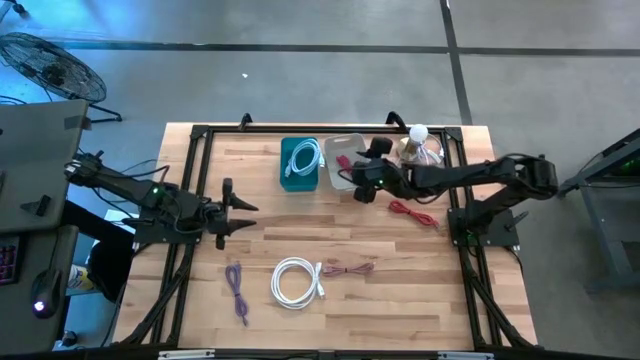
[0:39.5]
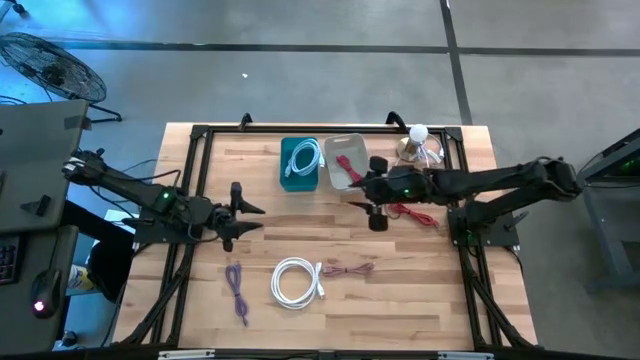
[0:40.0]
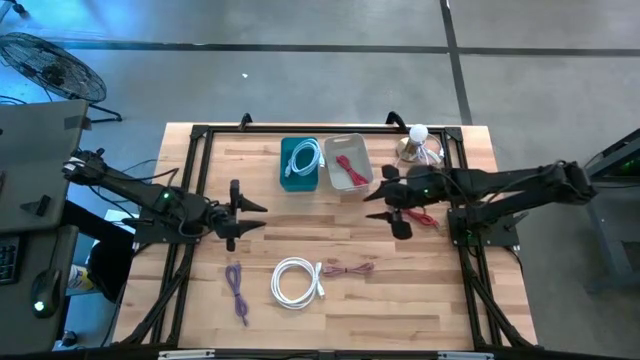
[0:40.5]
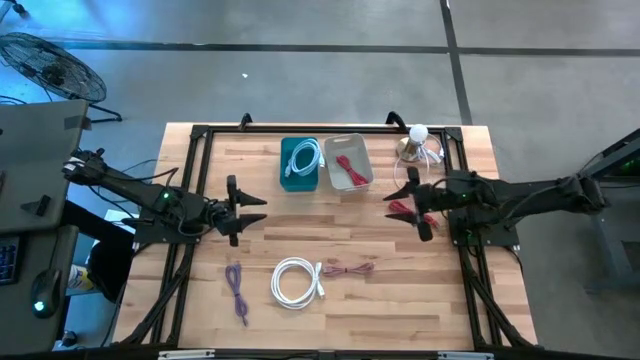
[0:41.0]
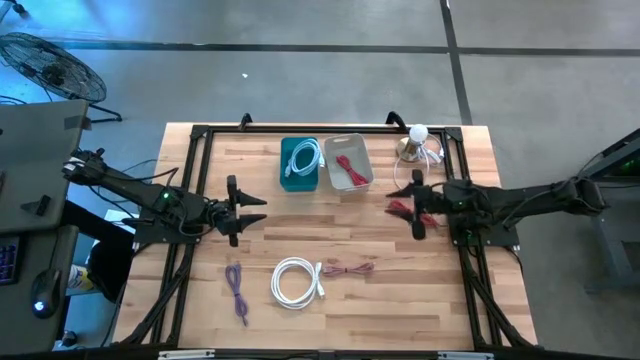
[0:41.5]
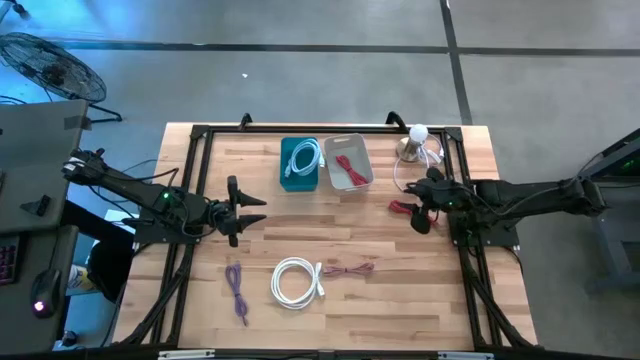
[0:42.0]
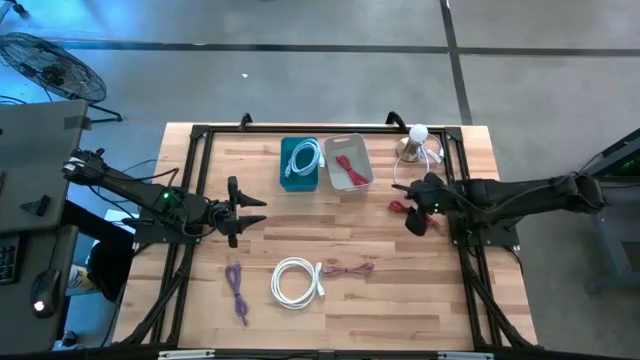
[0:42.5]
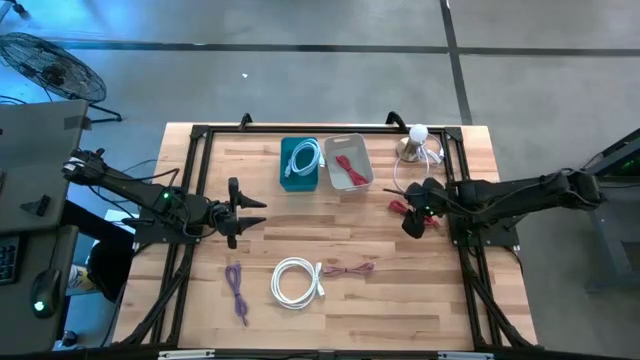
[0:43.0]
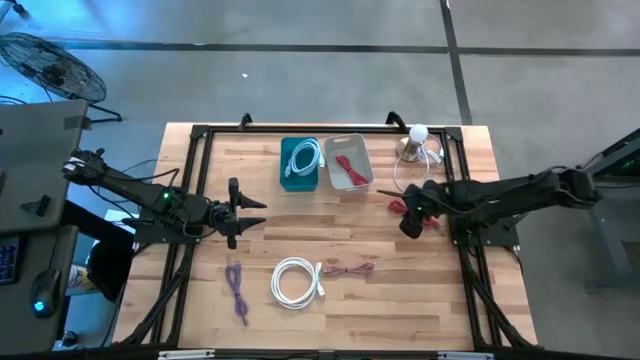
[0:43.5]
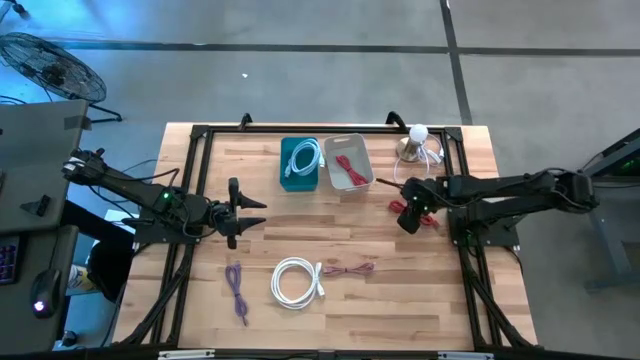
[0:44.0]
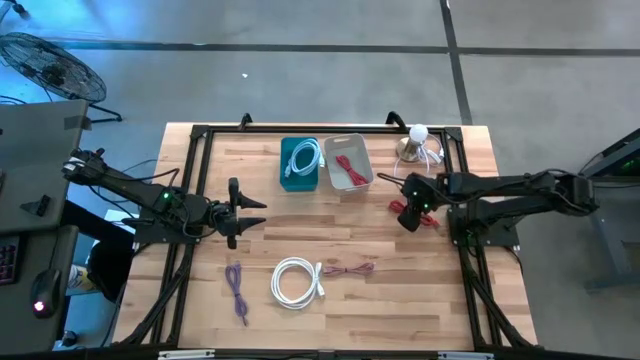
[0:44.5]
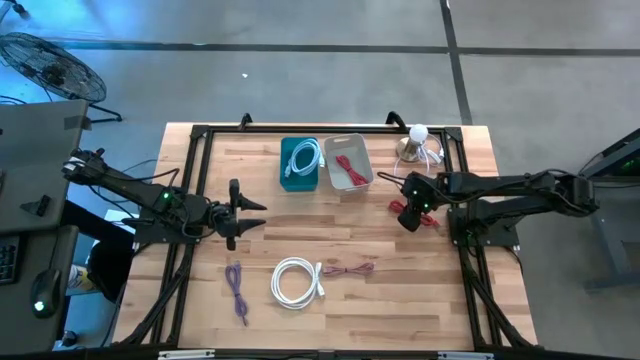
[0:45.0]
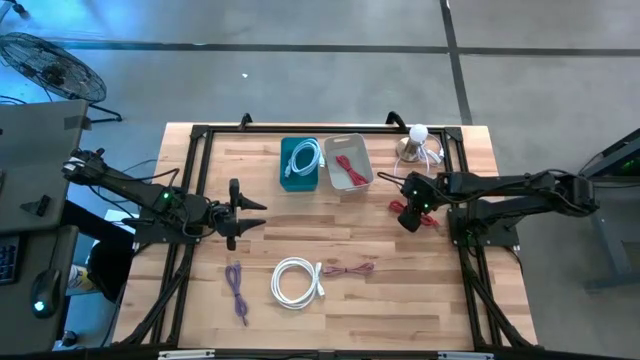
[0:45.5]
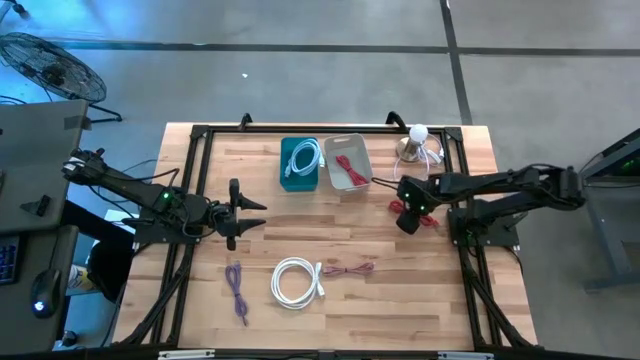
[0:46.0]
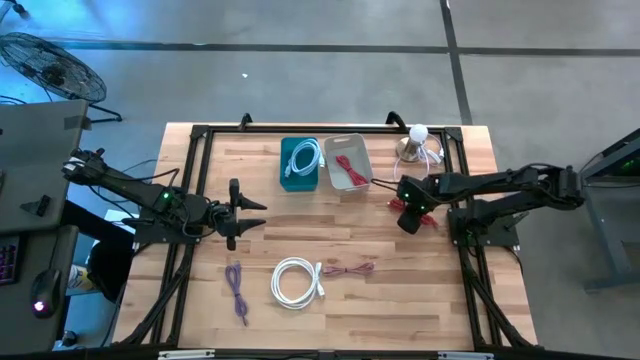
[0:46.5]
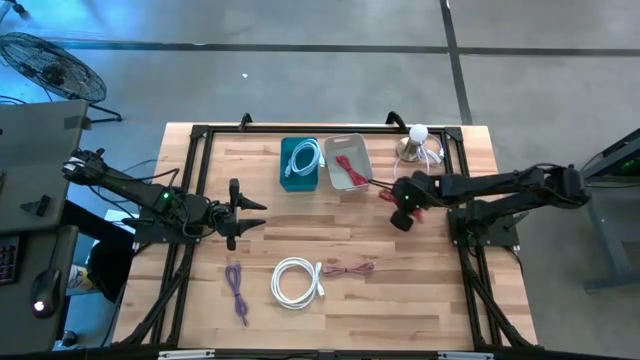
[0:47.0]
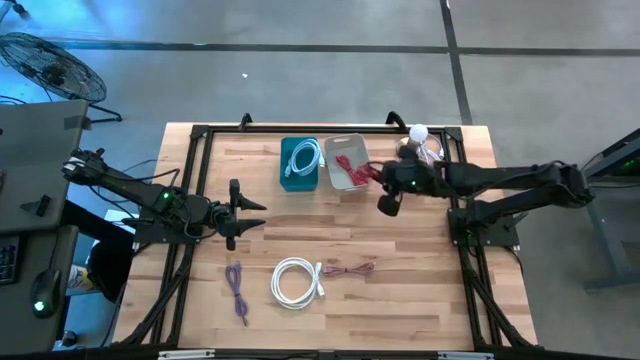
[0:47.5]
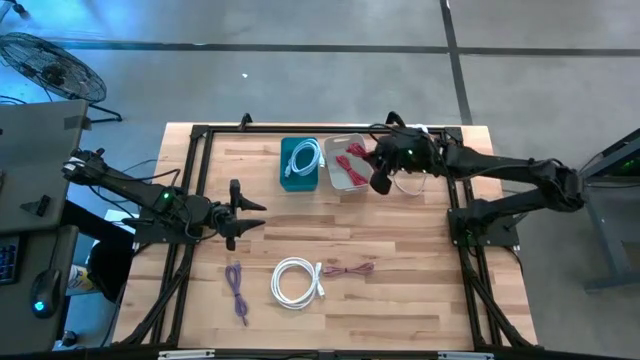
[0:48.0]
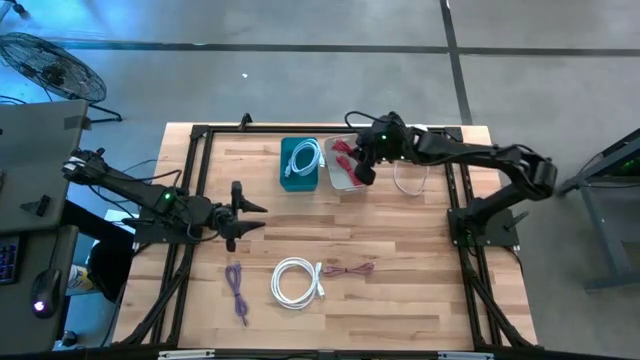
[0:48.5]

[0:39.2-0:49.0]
Task: Pick & Place USB Port
Put the orange charger cable into the gray bin

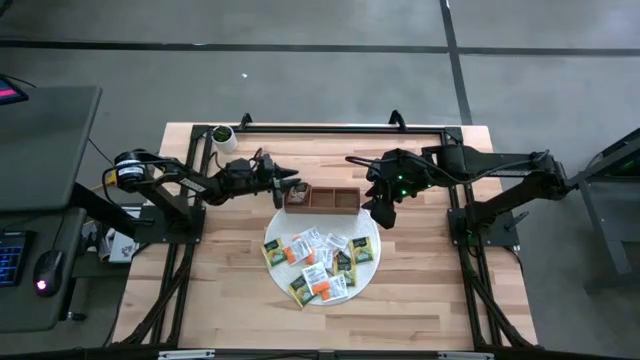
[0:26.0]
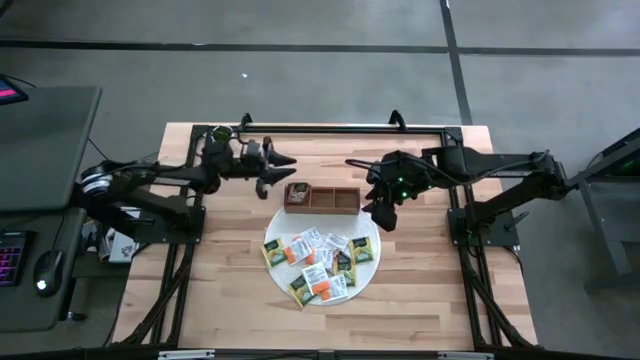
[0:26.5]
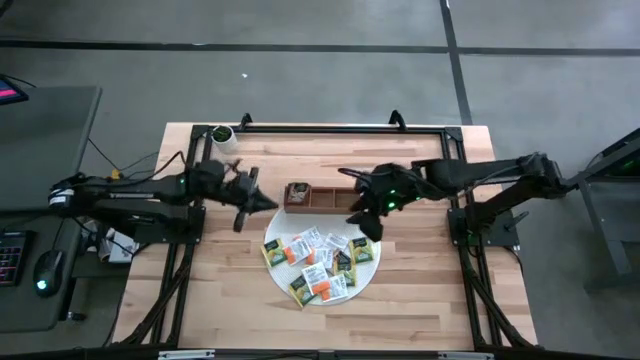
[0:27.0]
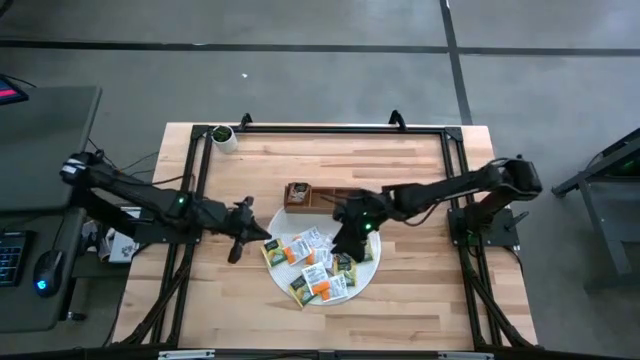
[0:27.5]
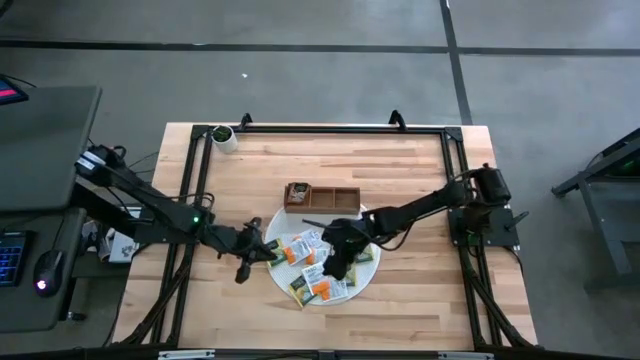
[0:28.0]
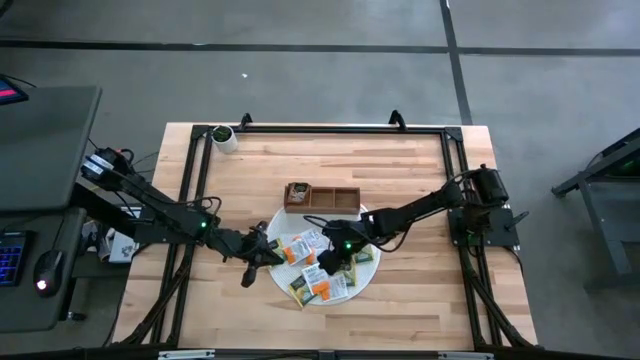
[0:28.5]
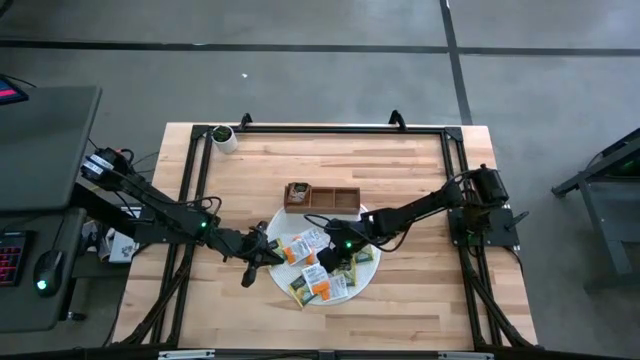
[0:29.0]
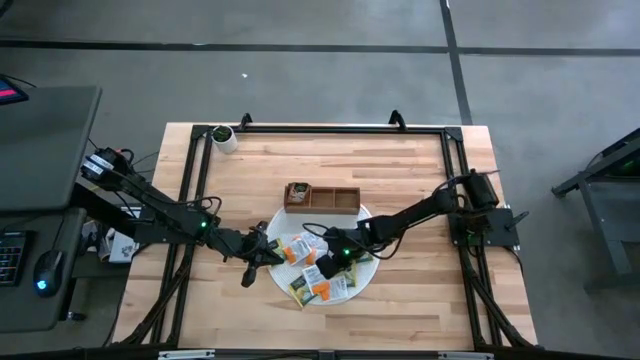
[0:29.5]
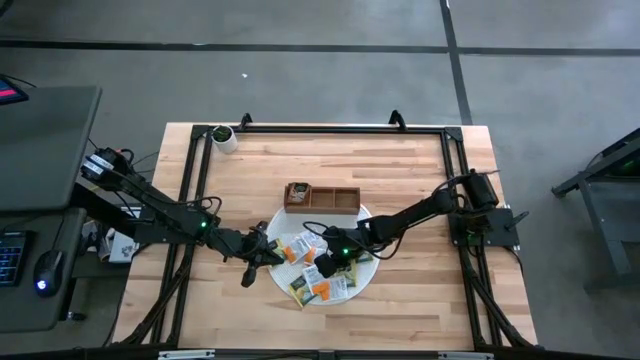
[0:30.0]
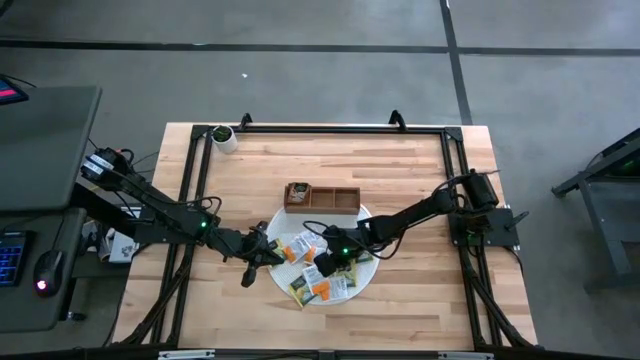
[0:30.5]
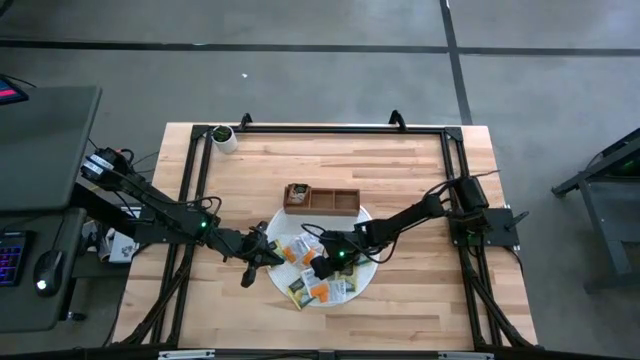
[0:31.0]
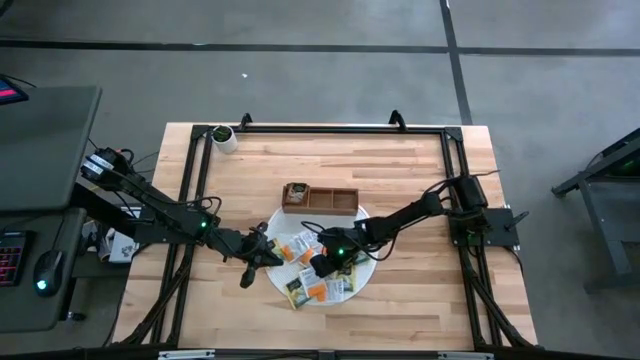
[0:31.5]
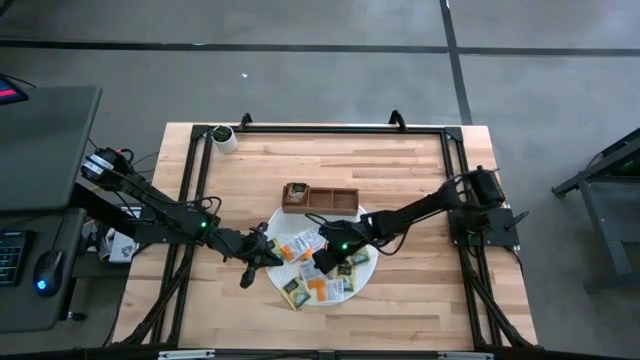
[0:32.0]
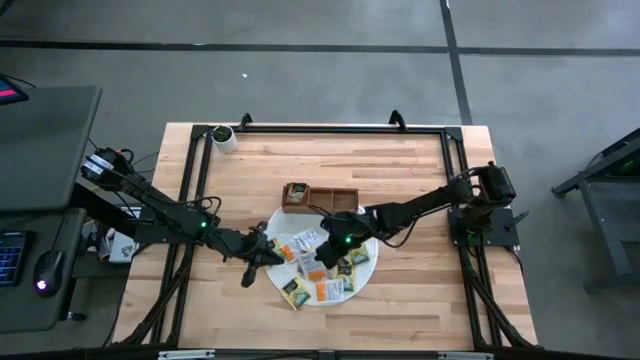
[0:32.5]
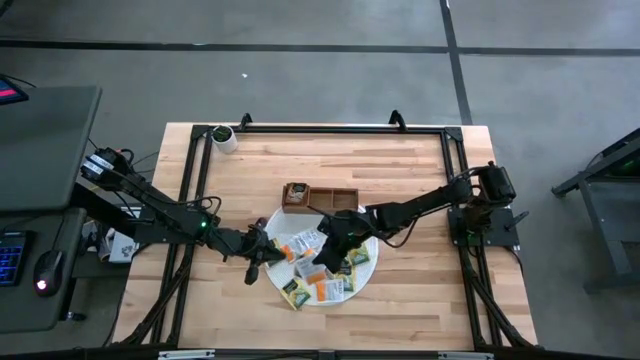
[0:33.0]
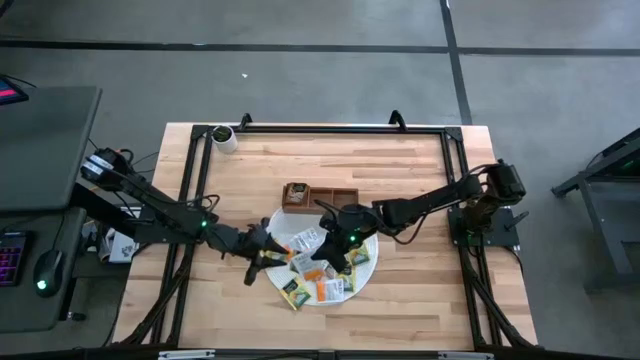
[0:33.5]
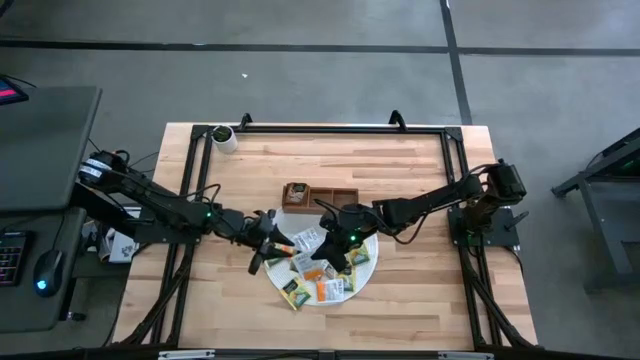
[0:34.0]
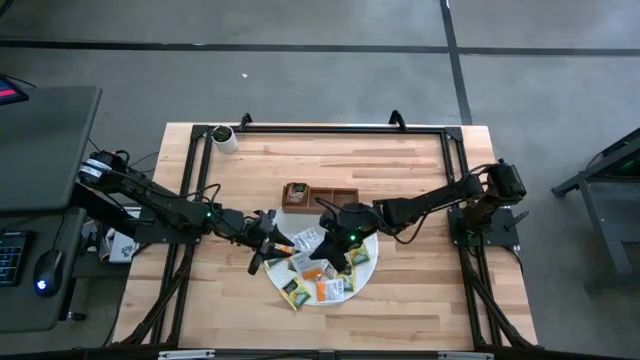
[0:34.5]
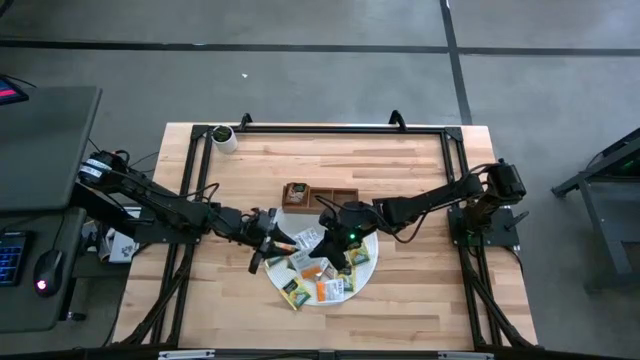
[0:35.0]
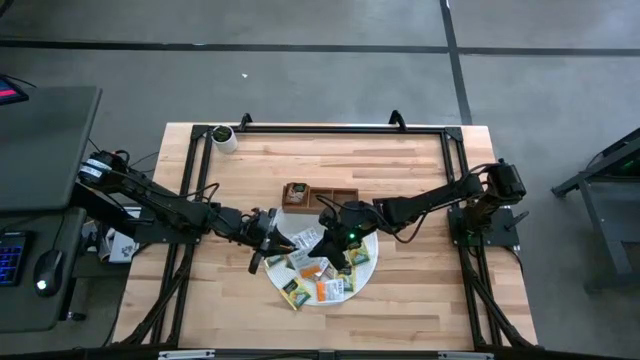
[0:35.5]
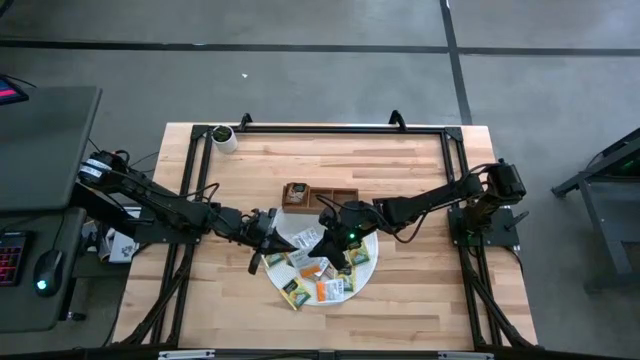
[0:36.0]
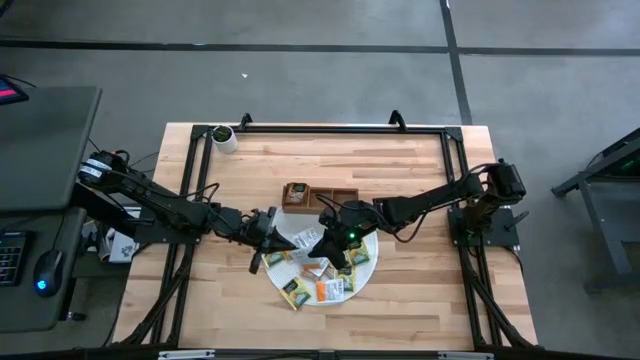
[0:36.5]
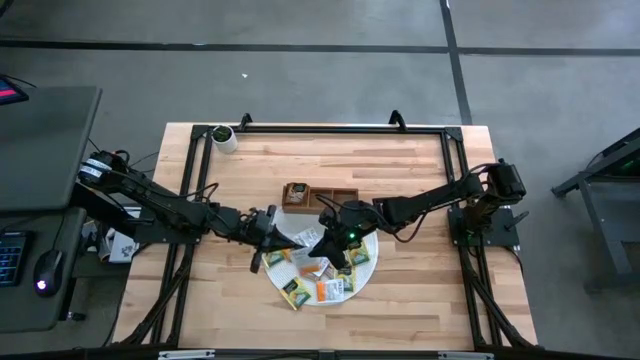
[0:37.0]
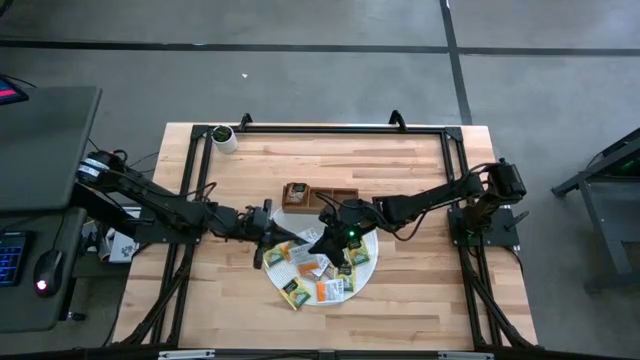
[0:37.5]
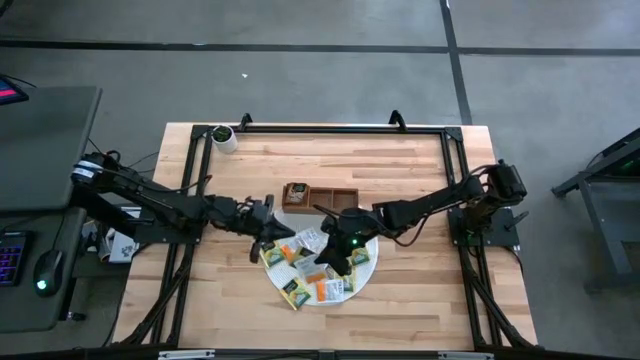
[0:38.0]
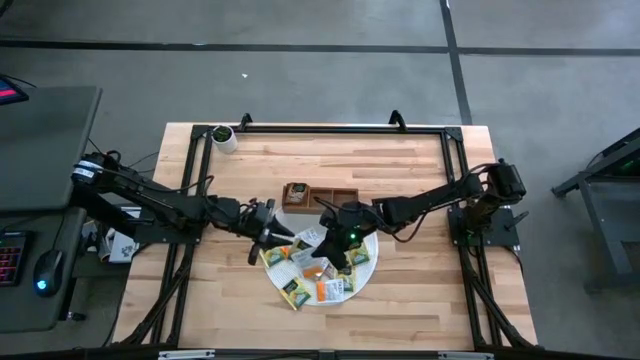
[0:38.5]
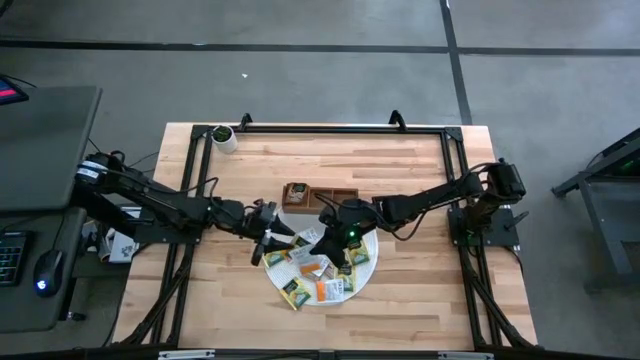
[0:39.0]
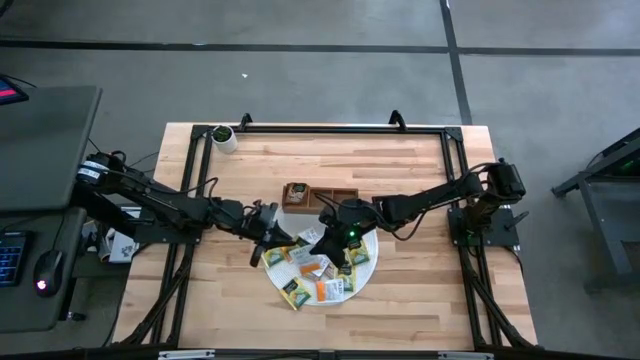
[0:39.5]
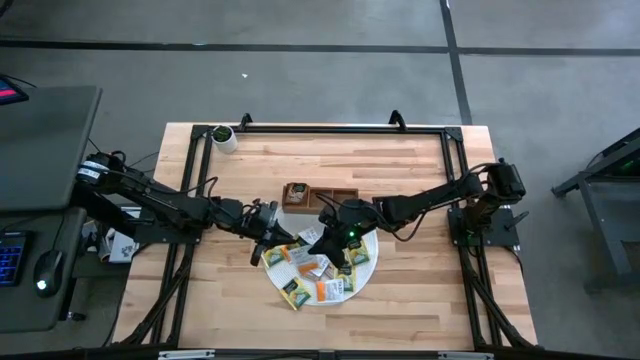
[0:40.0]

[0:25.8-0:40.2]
Task: Pick & Place Tea
Put the yellow tea bag into the right section of the wooden organizer
